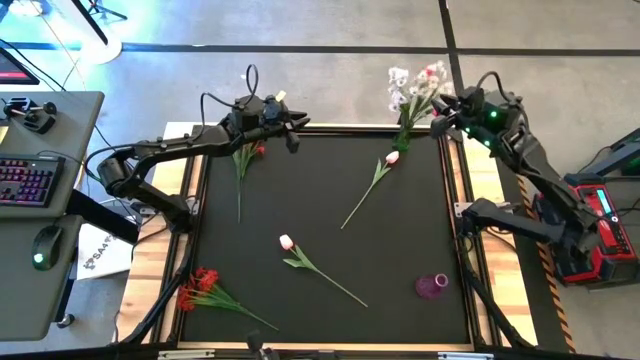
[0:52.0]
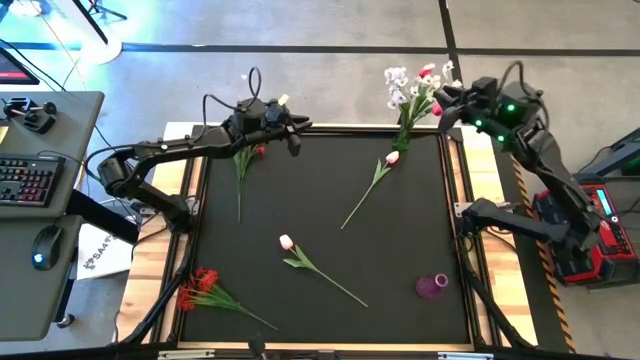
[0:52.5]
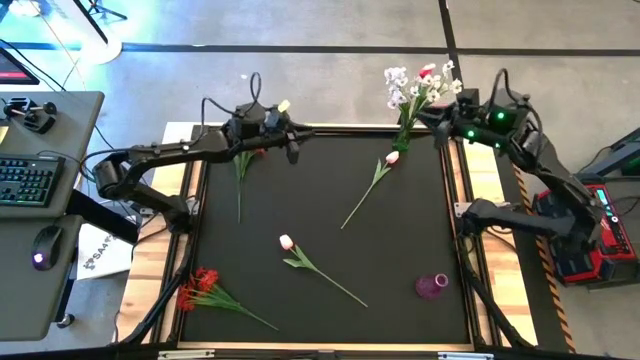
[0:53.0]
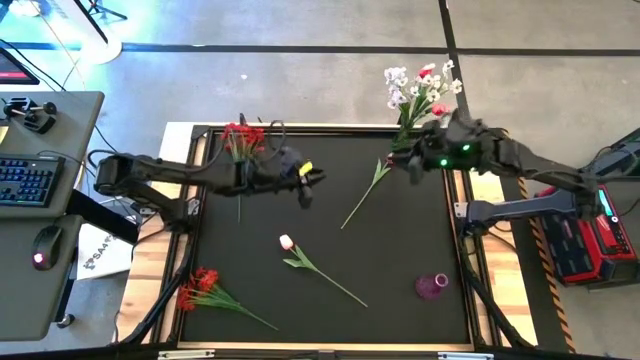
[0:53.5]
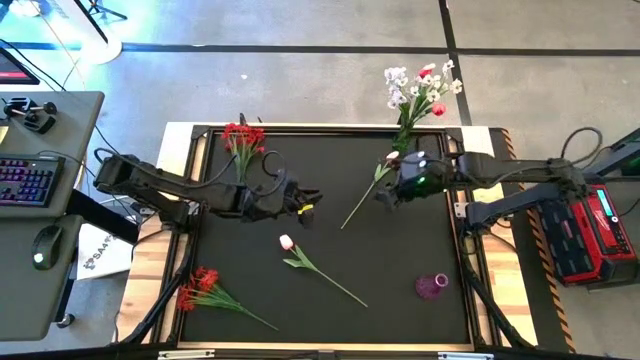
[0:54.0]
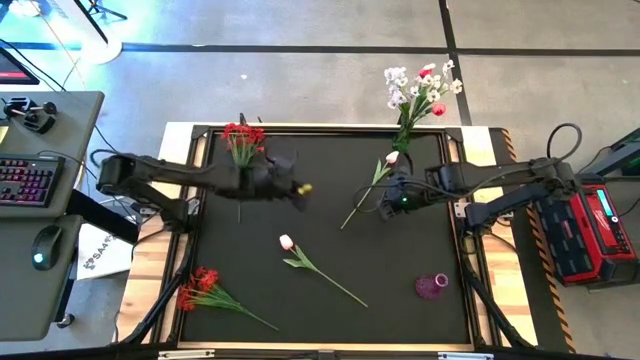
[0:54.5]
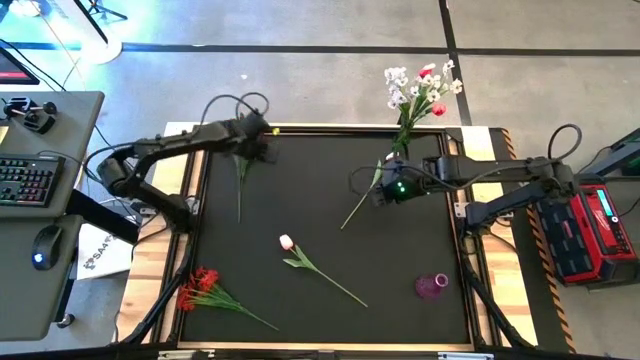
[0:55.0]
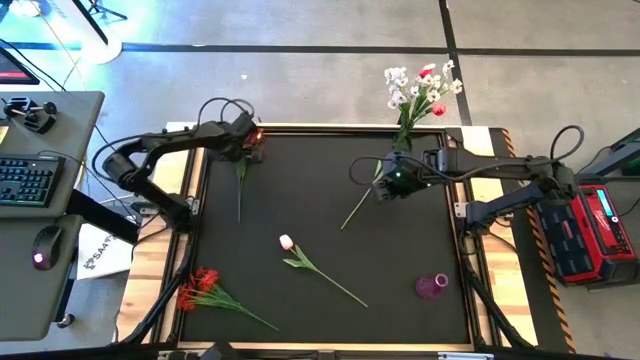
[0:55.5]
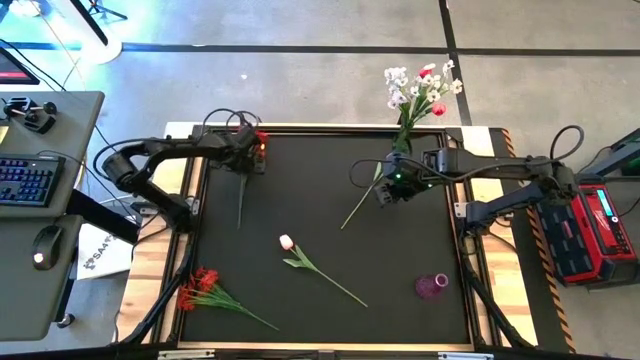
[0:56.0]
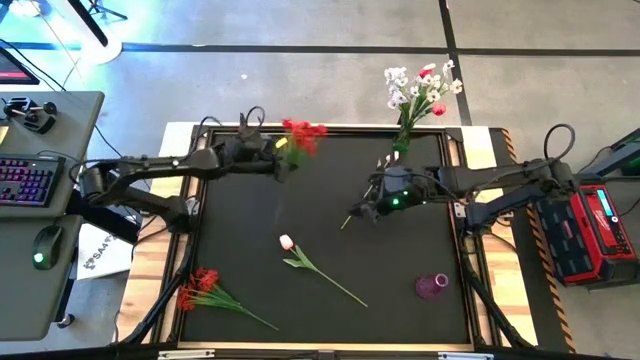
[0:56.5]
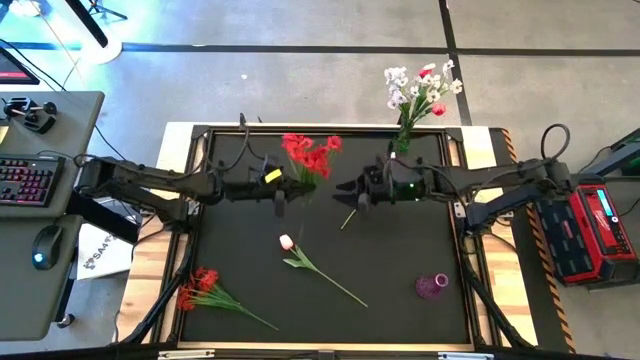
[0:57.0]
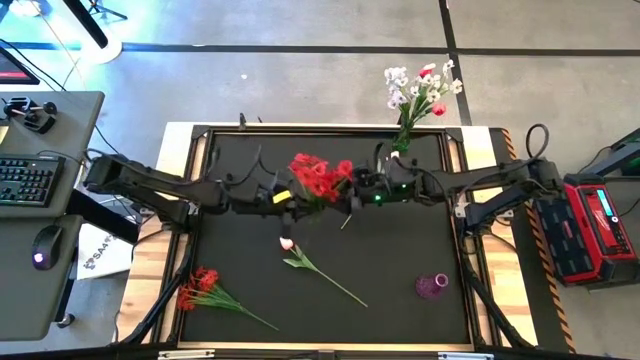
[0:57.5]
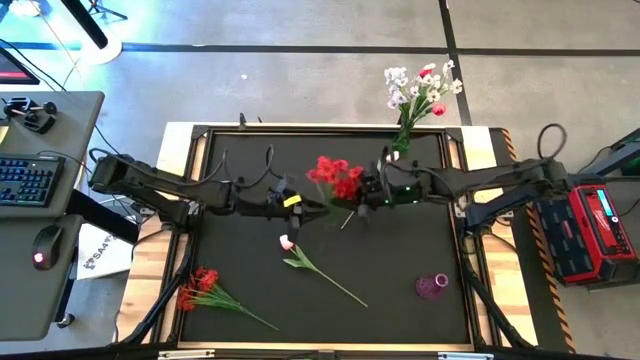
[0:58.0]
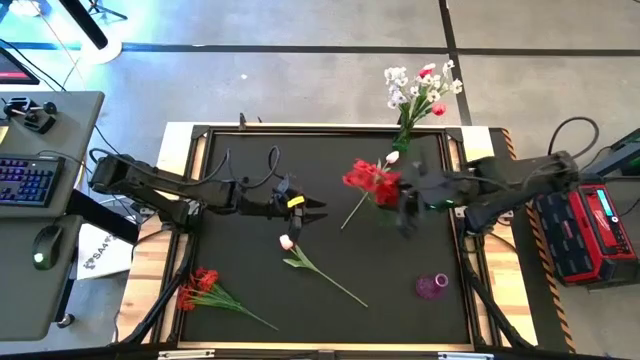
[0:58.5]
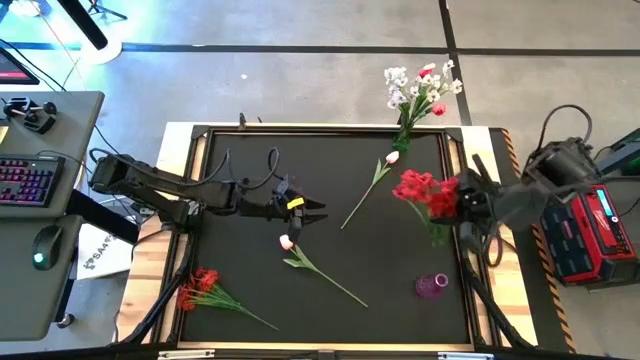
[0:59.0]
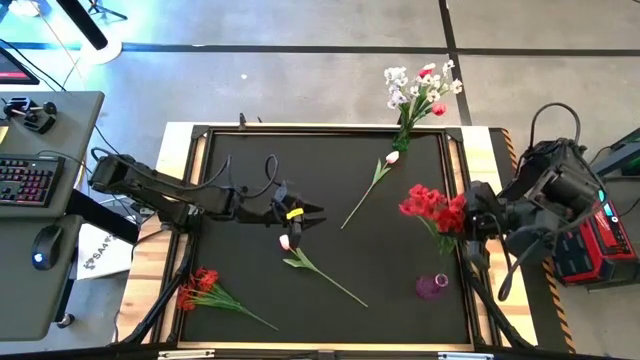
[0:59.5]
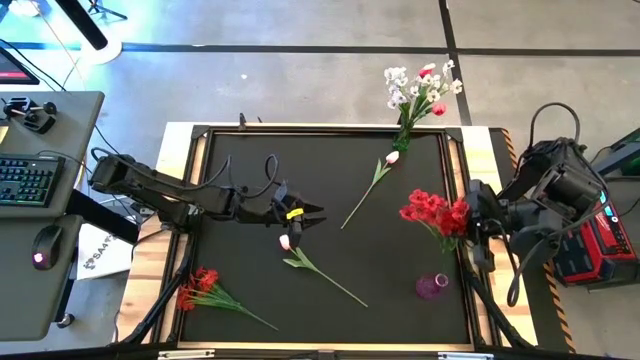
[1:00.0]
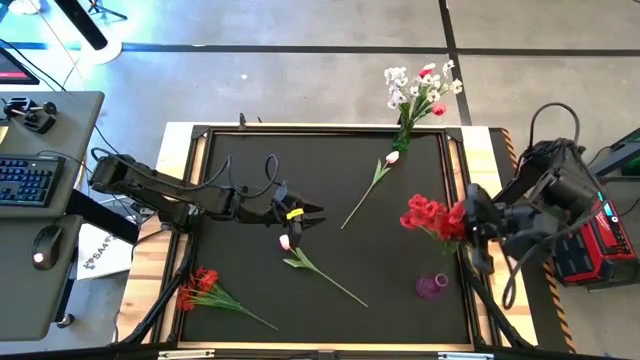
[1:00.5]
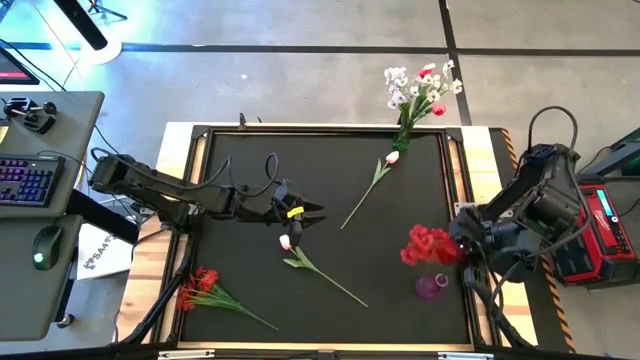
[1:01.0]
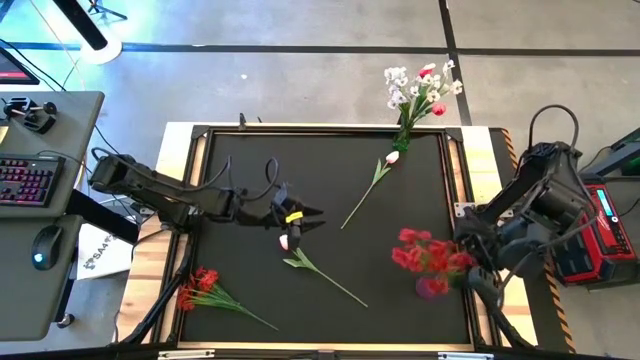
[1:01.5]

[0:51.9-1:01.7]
Task: Sort flowers into vase by color
Put the top red flowers into the violet vase

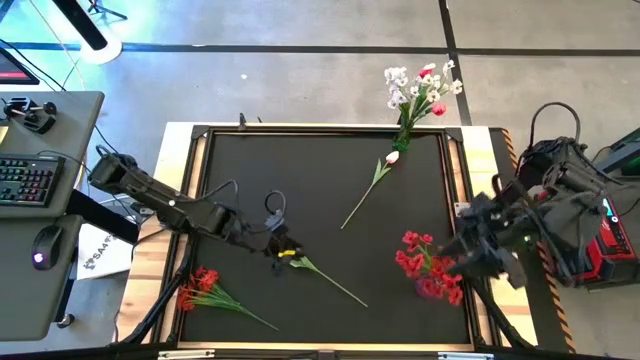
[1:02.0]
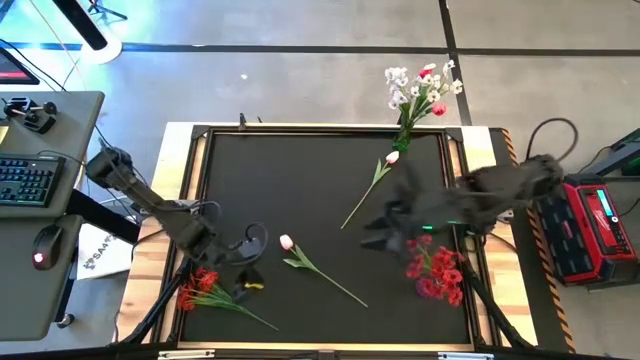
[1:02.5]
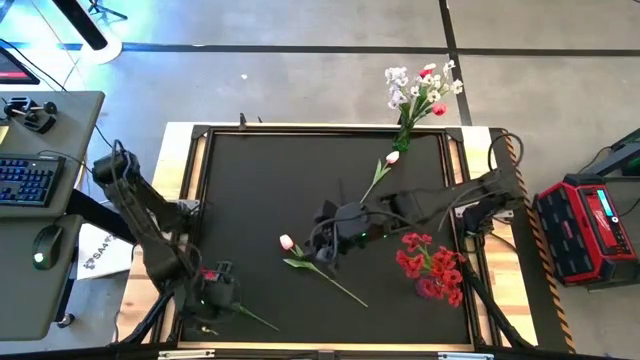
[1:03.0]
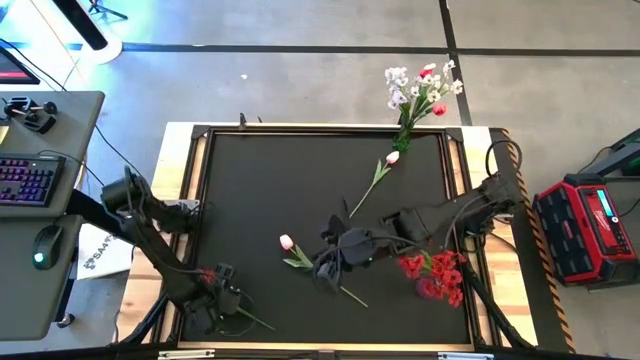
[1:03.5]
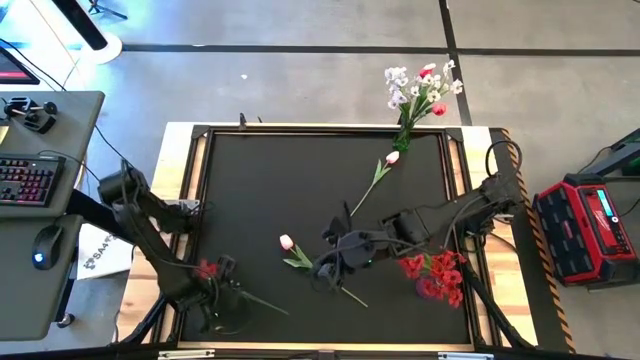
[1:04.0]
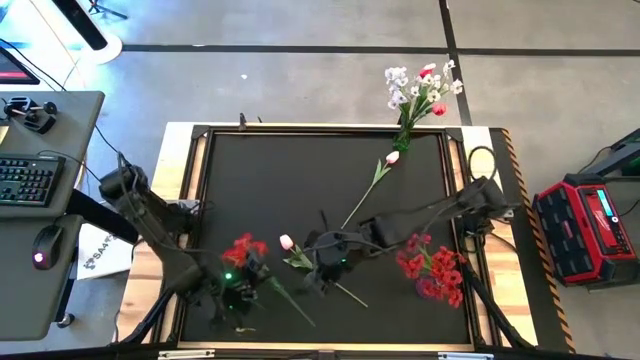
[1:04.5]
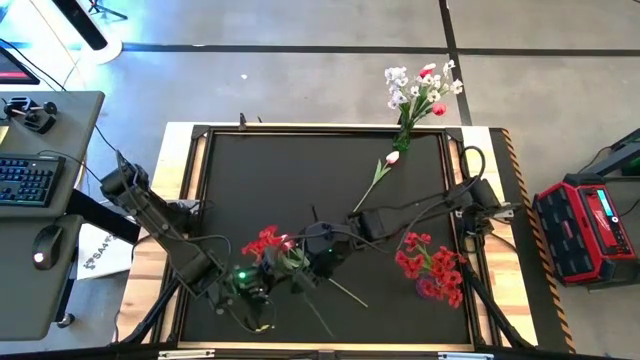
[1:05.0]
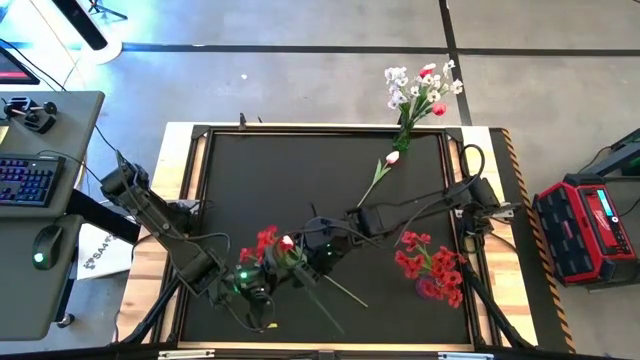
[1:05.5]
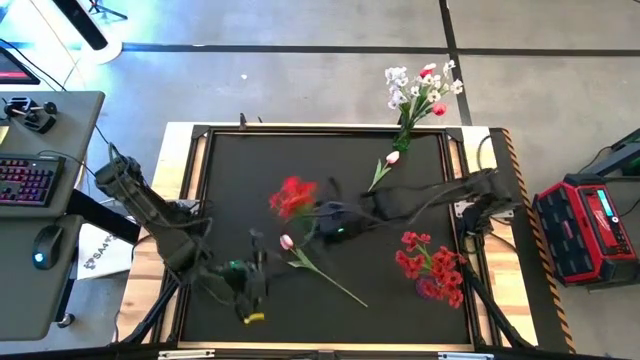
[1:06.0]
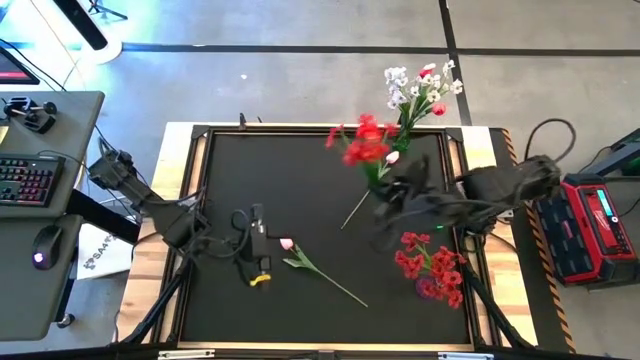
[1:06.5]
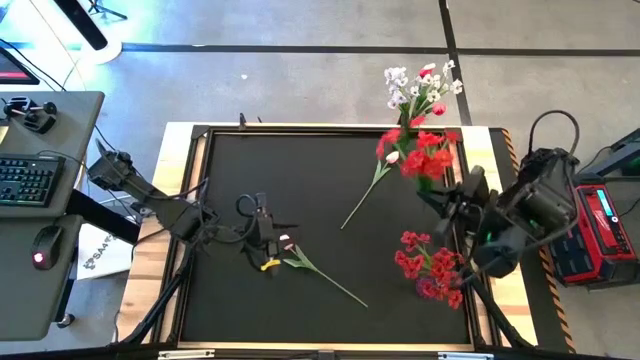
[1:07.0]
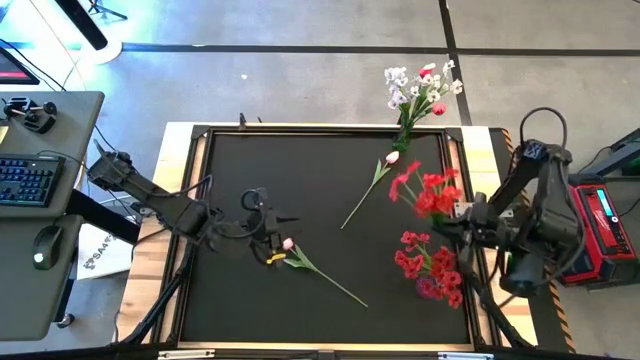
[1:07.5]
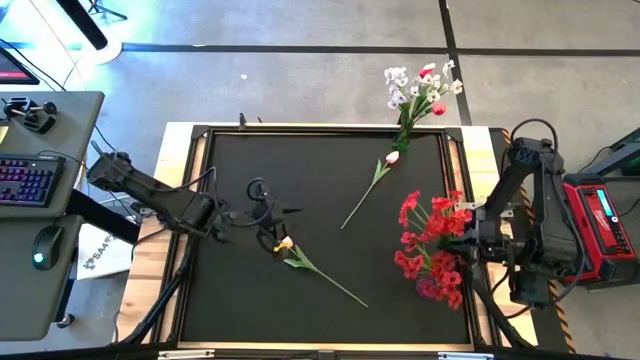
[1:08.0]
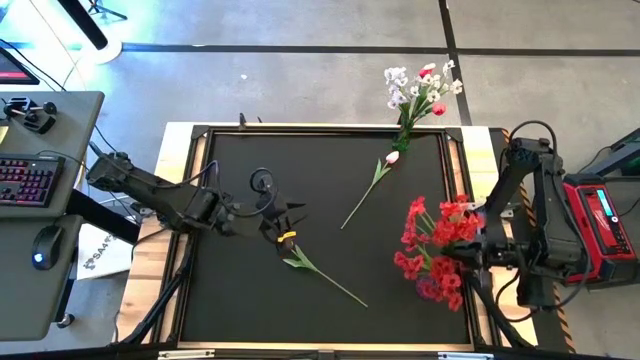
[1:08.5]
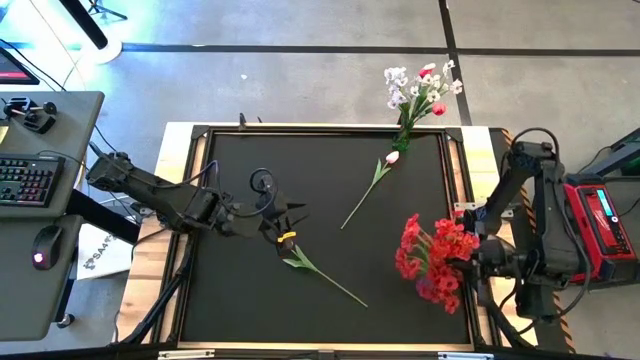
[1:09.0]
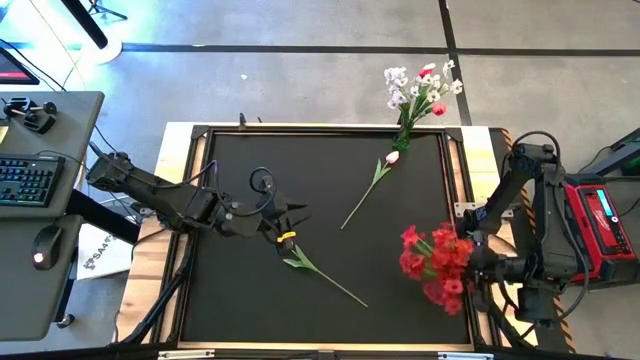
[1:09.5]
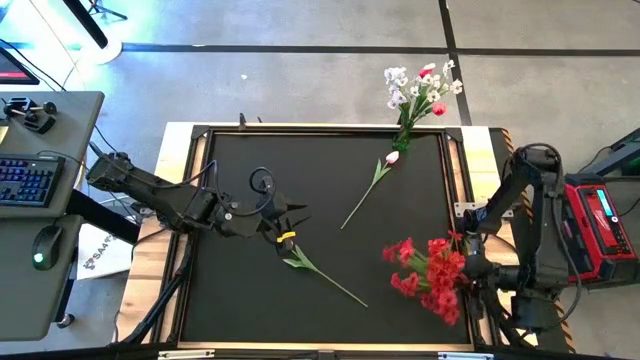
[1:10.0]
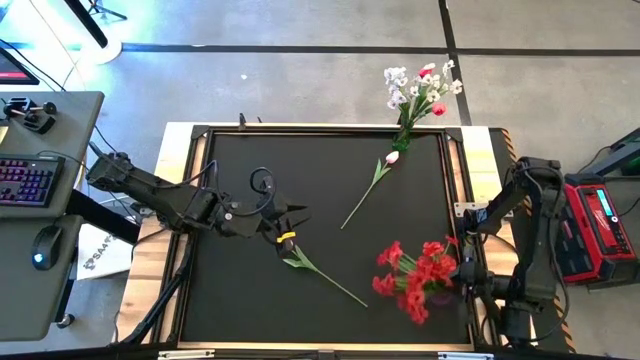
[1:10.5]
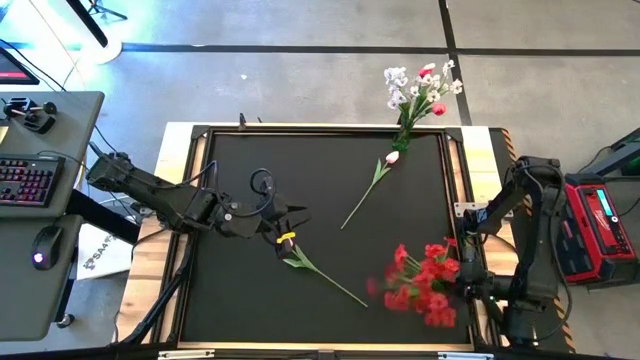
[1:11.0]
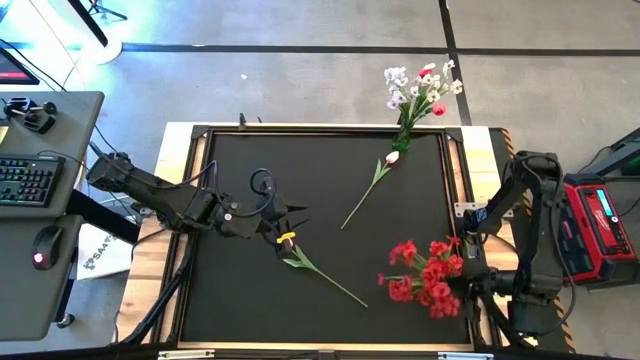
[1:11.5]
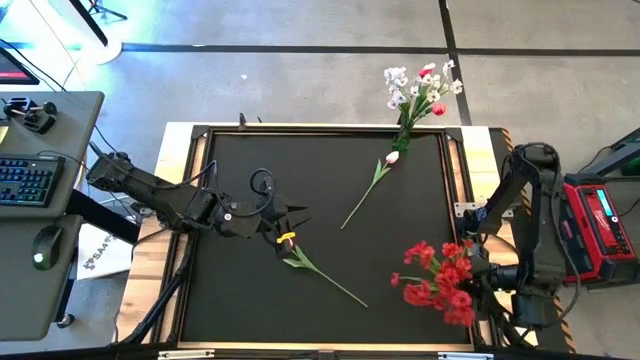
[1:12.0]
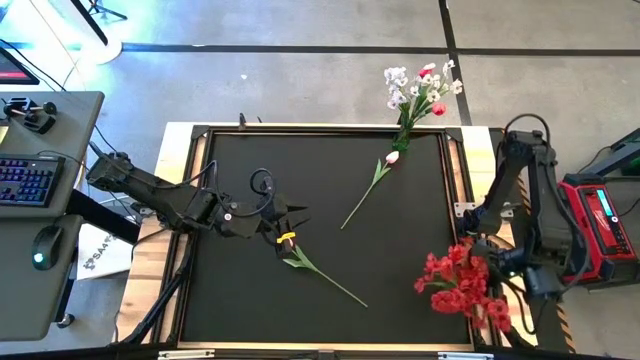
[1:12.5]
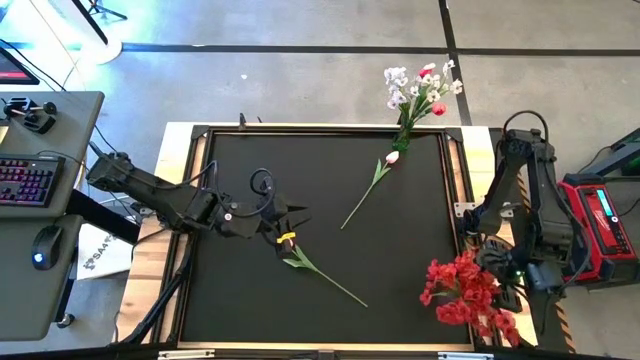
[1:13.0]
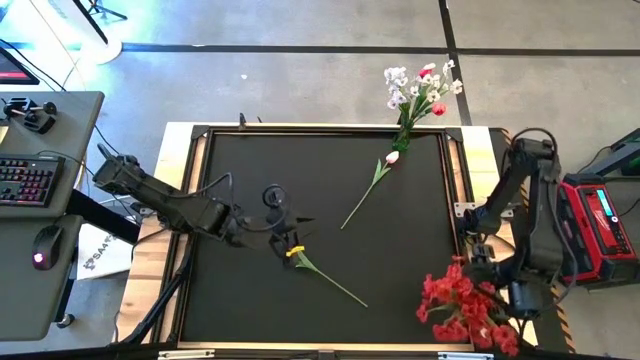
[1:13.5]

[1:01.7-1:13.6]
Put the red flowers into the violet vase

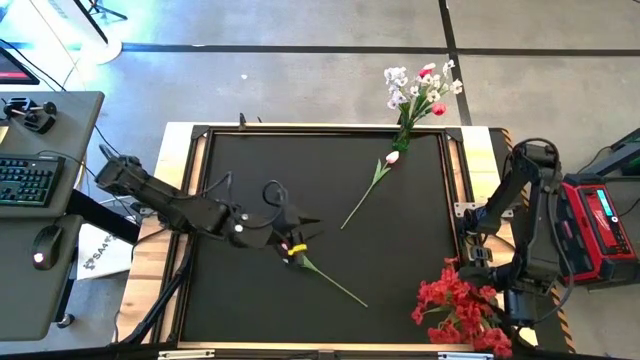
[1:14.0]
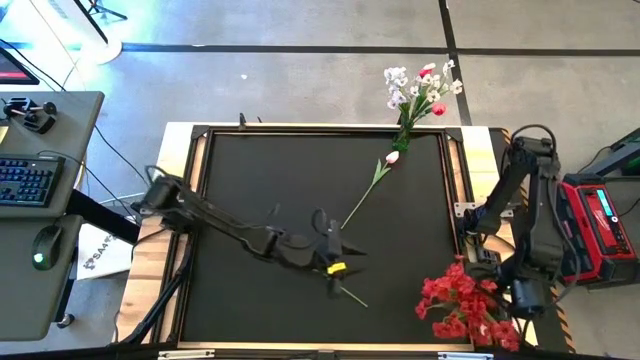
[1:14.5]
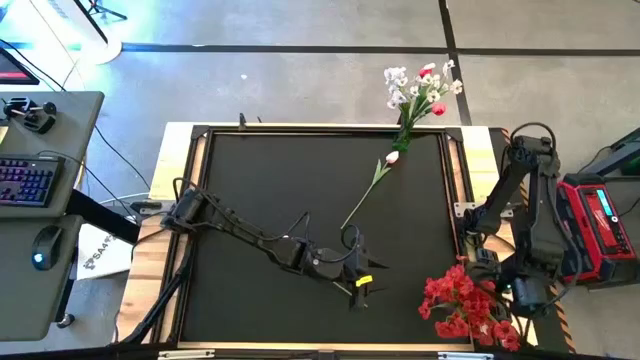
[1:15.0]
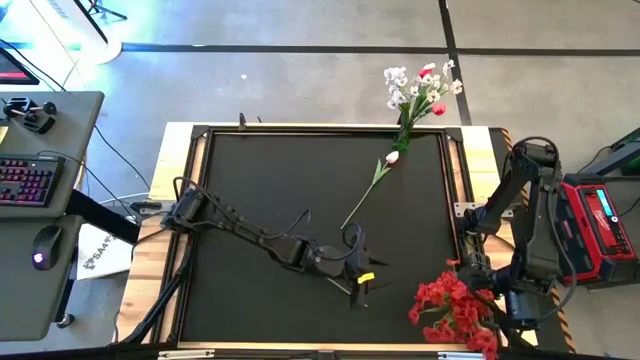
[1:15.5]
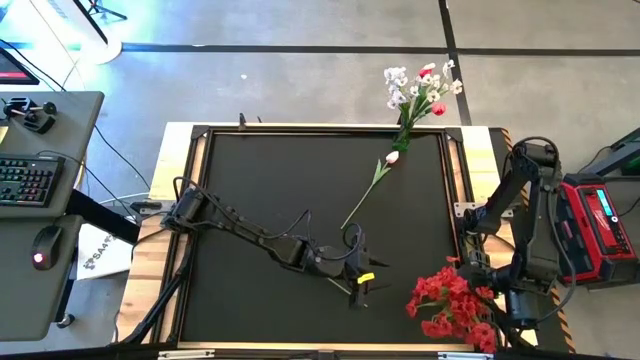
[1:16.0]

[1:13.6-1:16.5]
Adjust the violet vase
